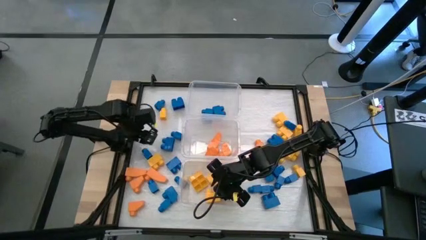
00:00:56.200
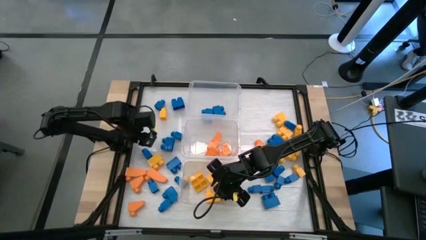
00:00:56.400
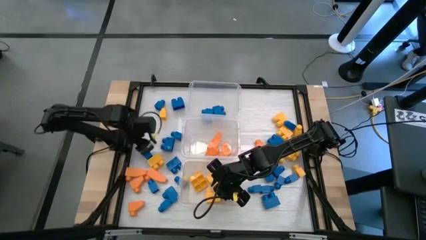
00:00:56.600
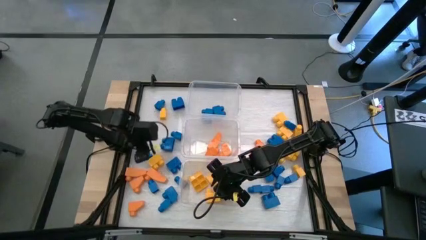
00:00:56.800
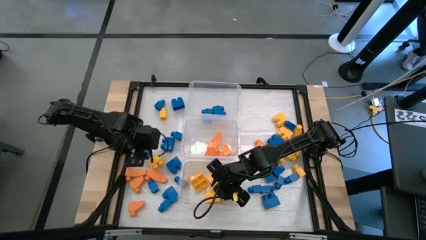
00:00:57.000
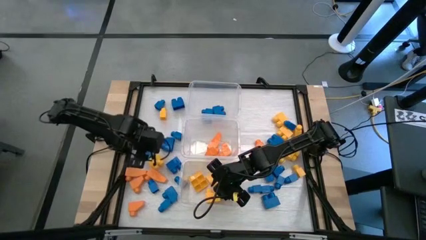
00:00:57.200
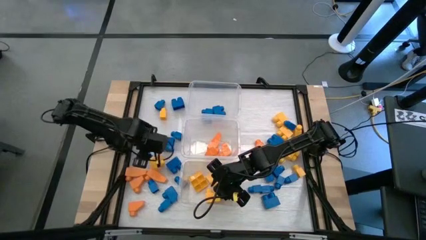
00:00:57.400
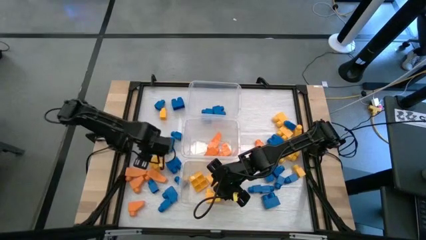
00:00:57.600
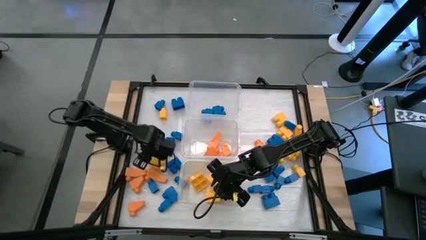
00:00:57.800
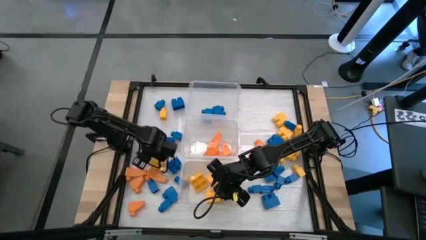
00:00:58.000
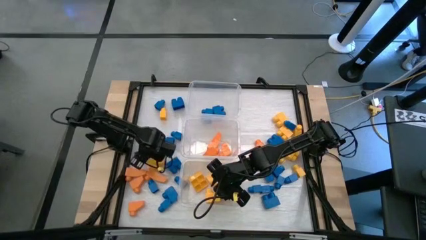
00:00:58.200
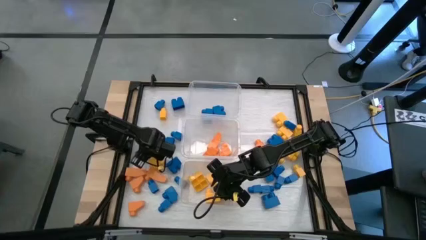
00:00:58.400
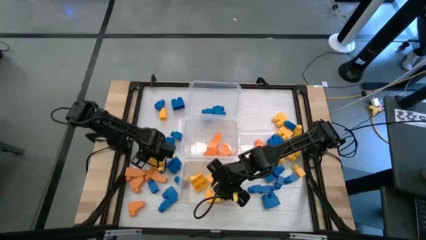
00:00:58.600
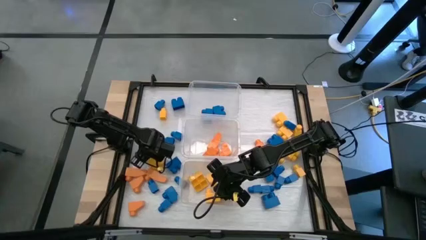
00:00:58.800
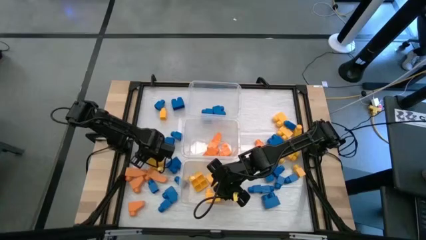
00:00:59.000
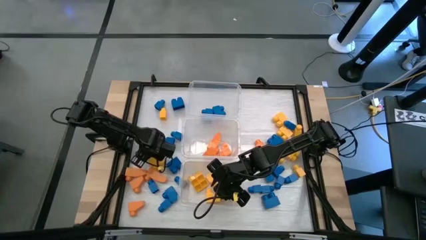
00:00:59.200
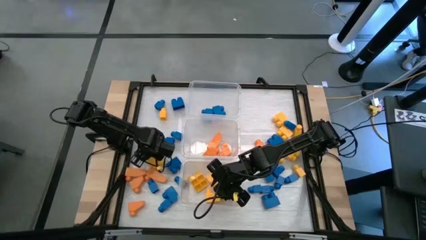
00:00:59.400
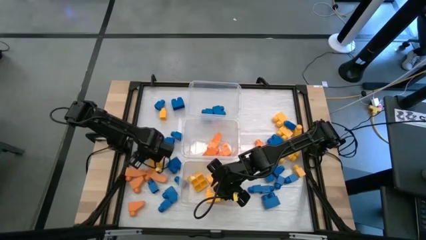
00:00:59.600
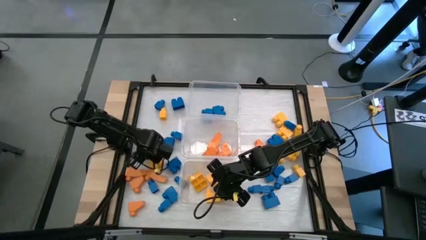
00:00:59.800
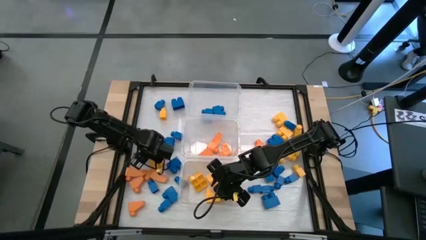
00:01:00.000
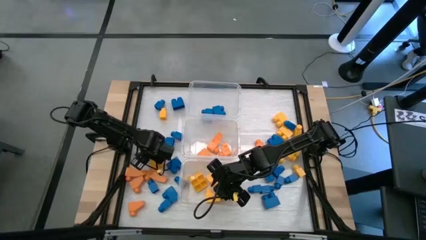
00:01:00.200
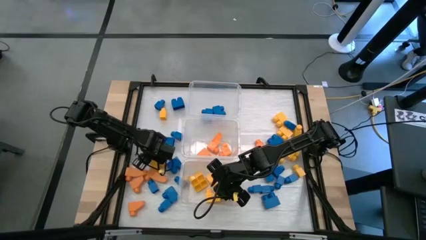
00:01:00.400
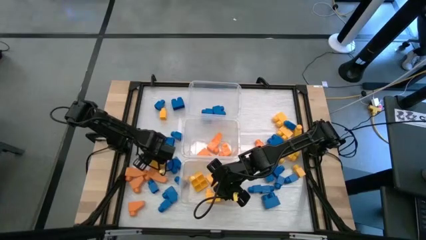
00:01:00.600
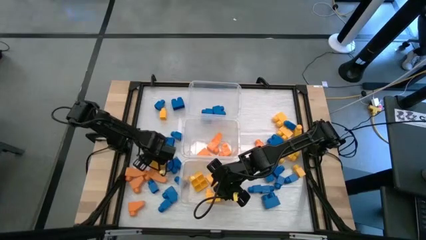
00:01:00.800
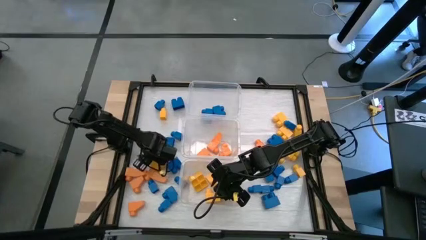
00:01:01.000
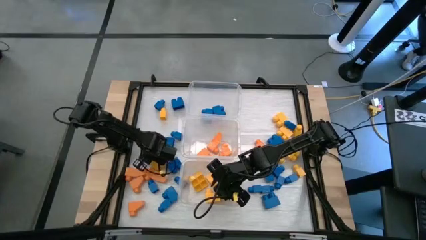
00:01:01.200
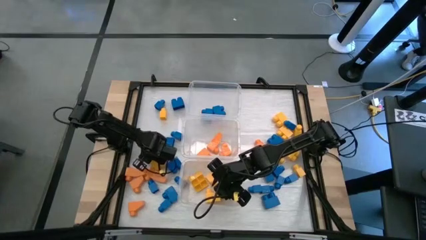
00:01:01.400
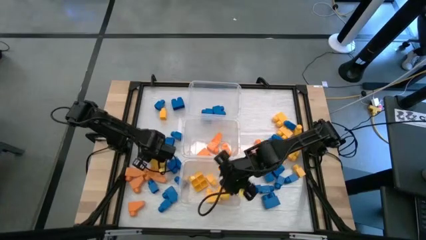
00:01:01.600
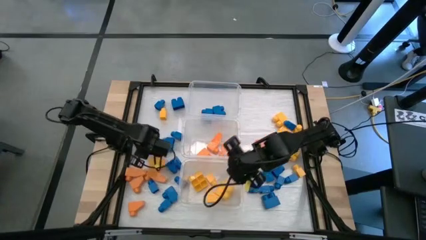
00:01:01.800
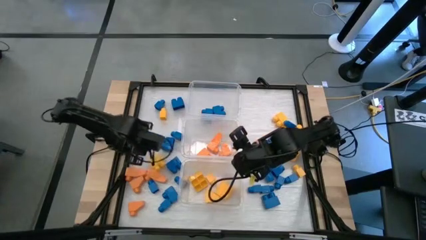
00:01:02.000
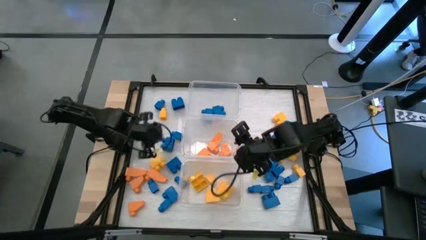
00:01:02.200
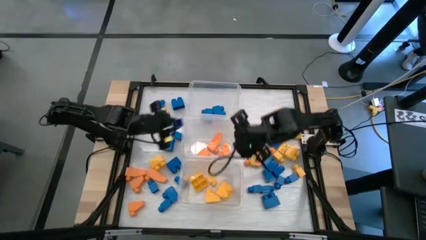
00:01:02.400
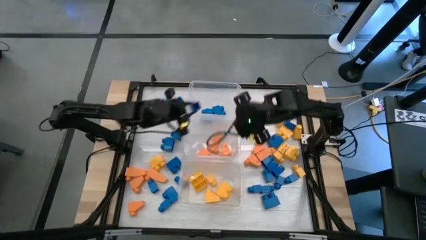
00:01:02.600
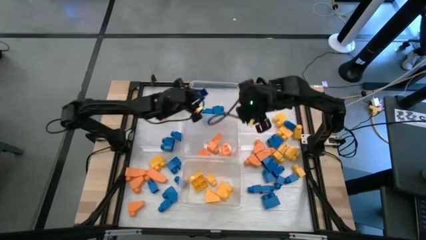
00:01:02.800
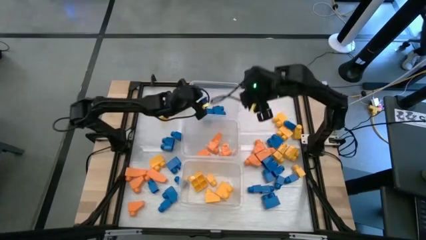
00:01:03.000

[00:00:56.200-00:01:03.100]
Task: Sort blocks
Put the blue game piece into the top transparent bin

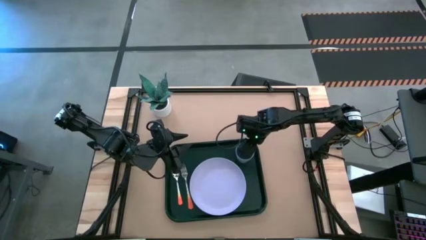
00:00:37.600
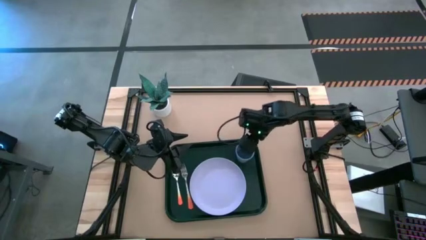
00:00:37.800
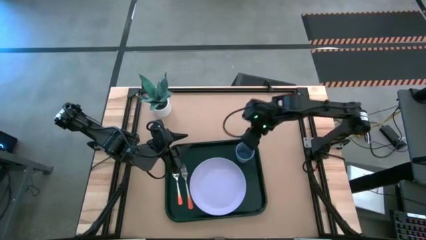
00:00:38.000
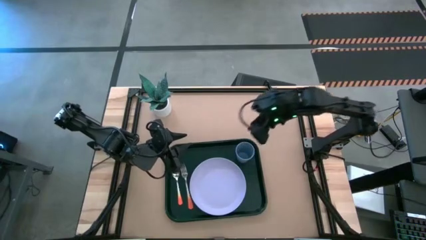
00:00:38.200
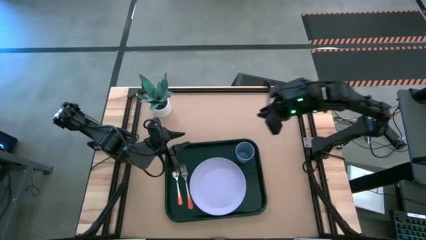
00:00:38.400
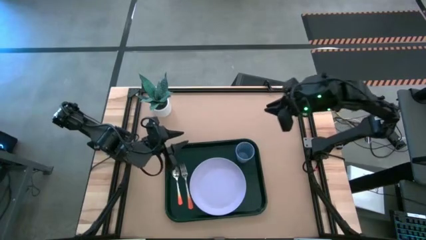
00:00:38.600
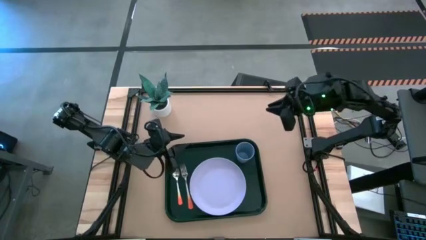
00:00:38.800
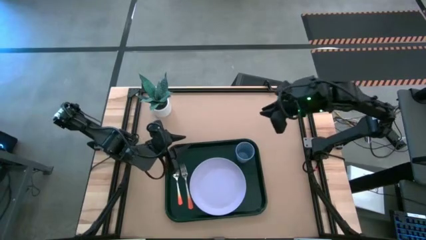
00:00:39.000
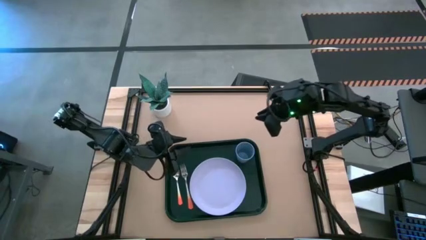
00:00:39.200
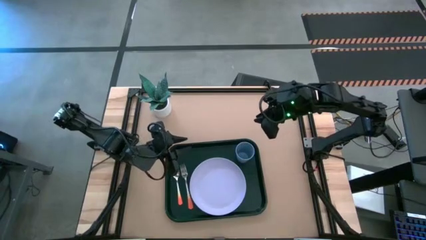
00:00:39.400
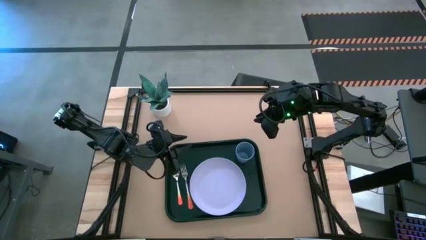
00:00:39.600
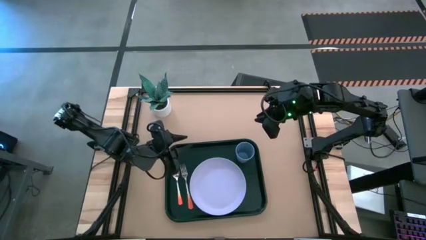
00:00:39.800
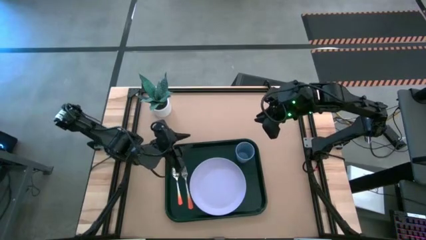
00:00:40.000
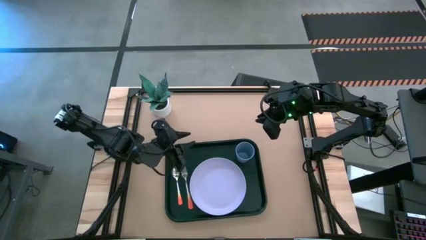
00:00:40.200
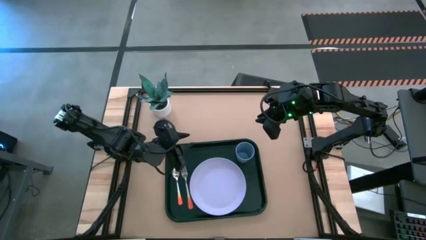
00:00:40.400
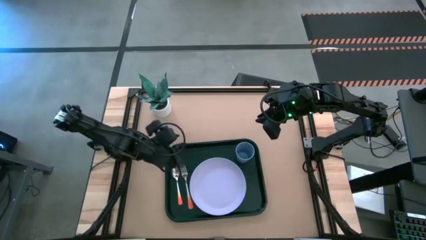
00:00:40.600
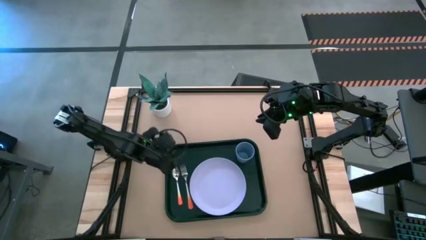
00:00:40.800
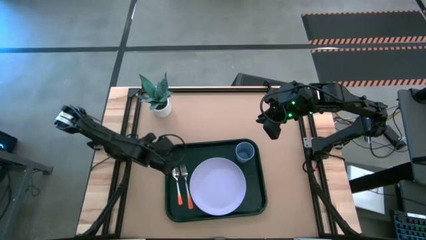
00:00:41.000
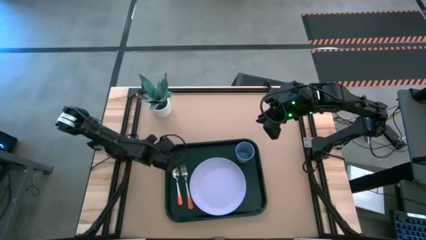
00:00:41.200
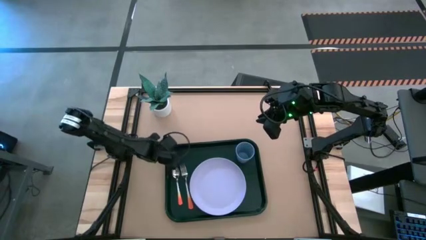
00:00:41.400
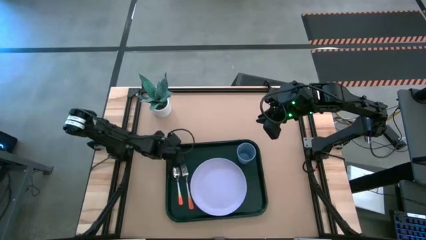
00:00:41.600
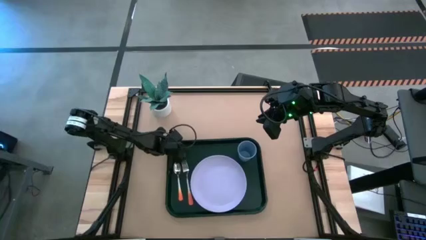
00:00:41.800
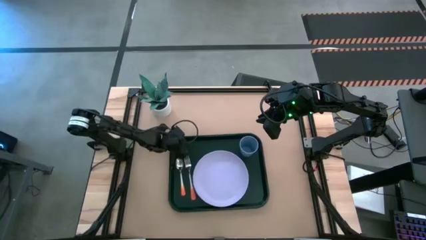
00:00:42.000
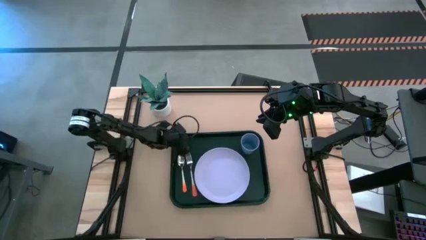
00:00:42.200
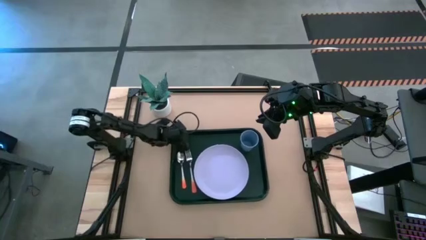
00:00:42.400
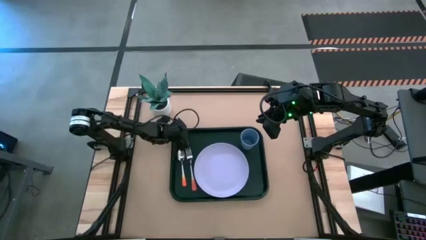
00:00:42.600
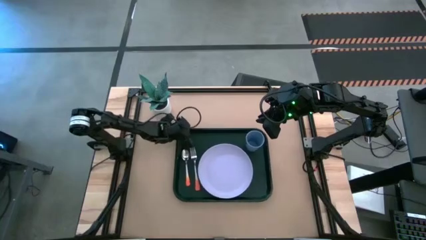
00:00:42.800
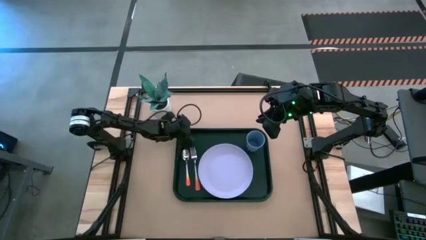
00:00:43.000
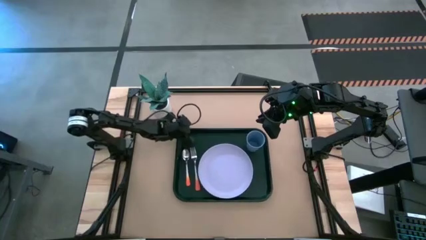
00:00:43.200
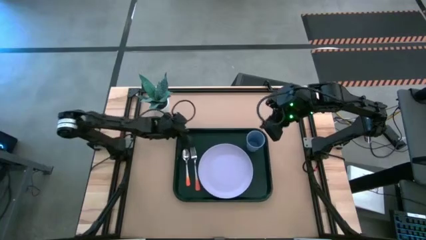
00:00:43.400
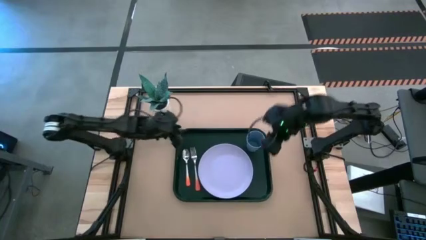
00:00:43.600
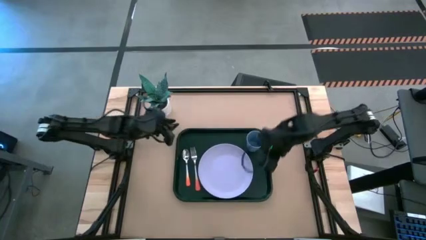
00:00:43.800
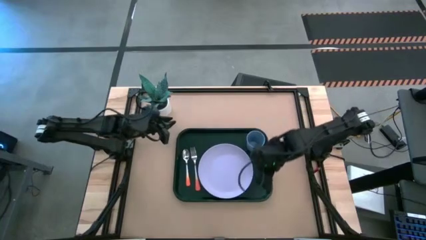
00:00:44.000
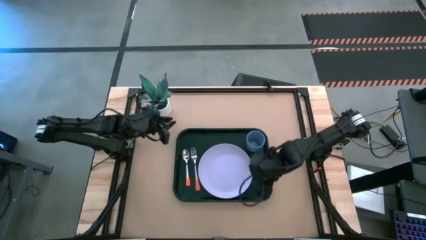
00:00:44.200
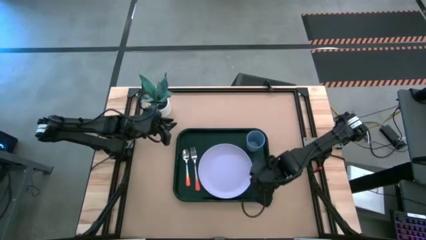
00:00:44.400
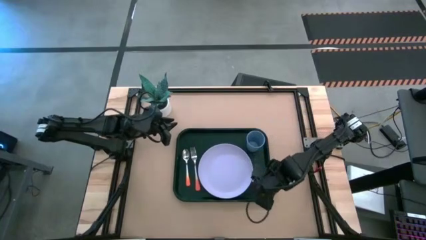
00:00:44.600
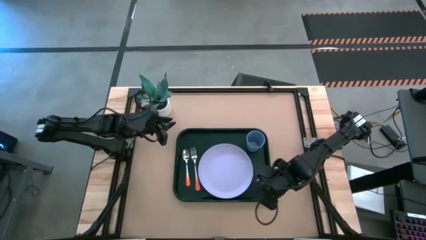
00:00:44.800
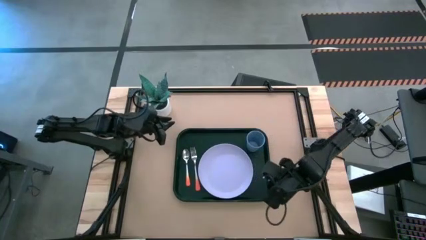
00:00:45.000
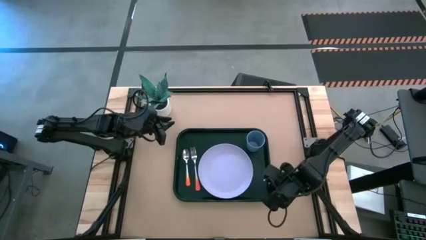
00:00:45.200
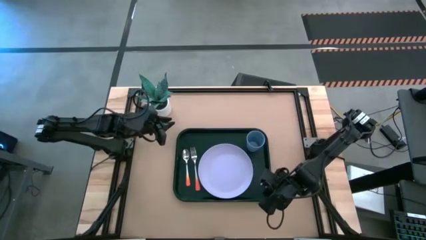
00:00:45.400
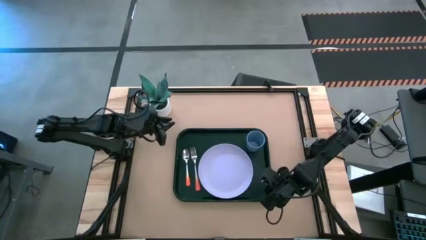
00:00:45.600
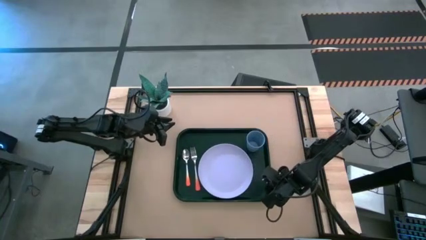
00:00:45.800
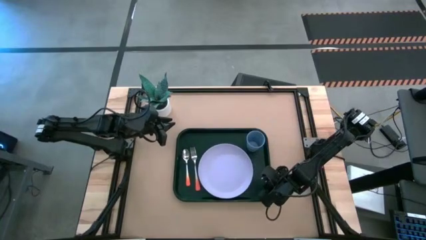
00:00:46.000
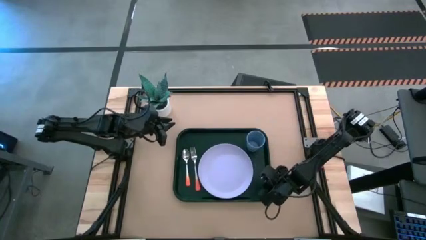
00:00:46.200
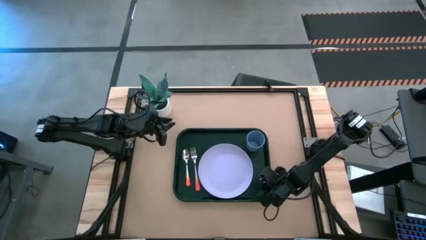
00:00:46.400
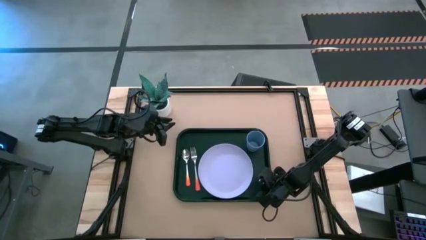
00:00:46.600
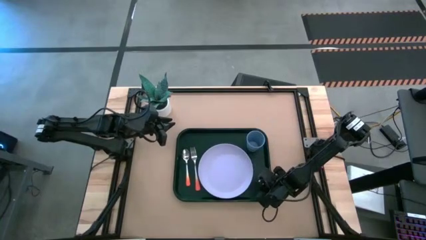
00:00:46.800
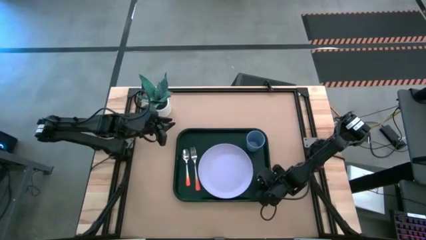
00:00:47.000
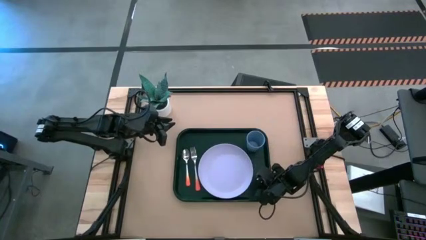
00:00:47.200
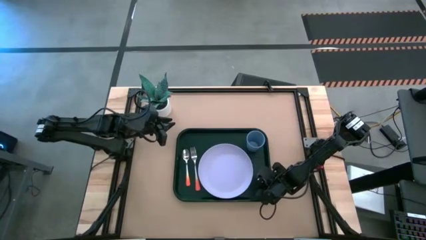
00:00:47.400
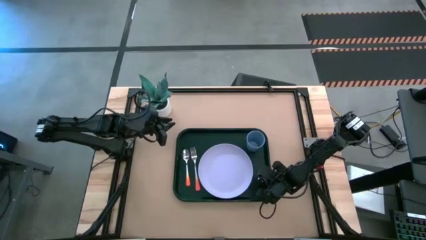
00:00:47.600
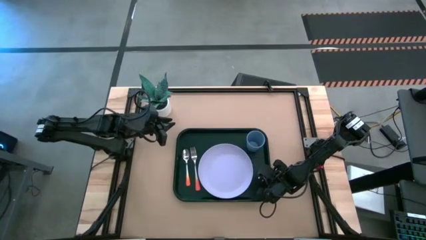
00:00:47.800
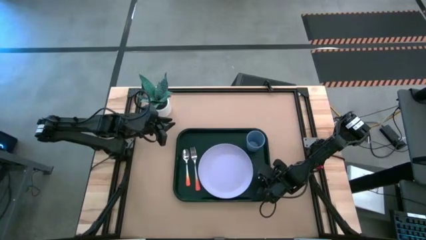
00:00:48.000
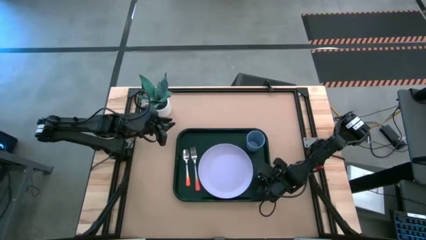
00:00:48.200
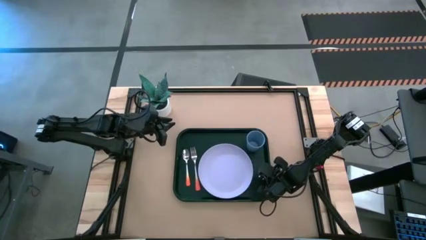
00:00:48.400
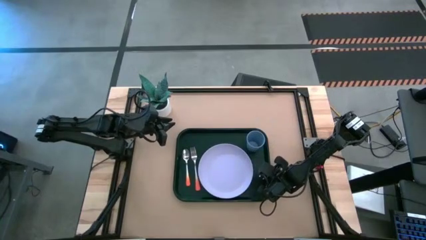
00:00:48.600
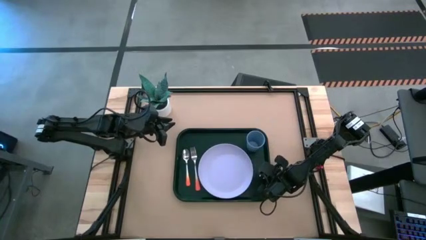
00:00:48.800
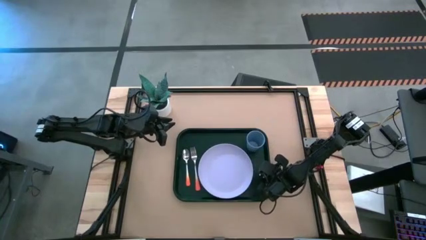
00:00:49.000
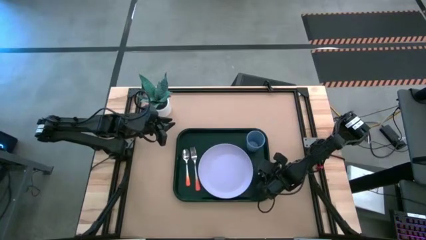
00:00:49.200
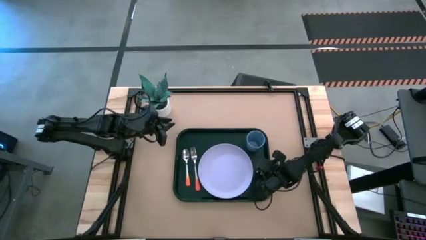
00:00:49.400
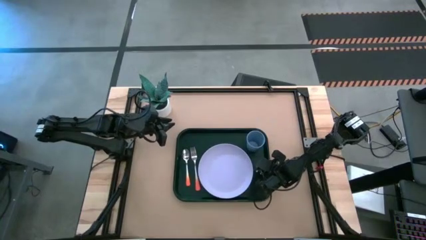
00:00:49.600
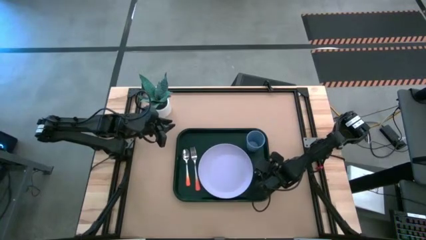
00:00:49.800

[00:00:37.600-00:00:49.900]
Task: Pick and place plate/cup/fork/spoon on tray
Adjust the dark green tray
